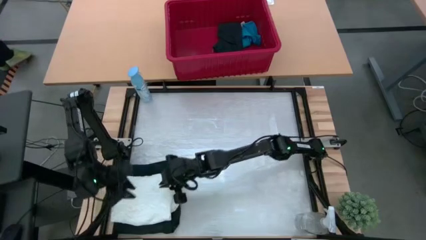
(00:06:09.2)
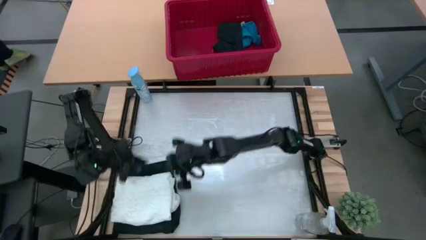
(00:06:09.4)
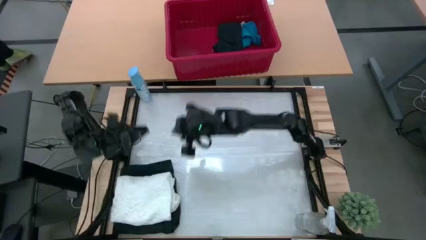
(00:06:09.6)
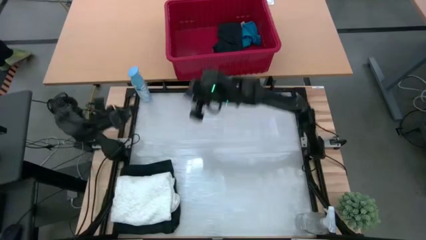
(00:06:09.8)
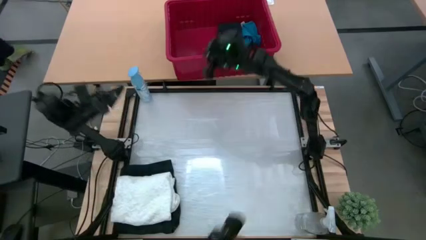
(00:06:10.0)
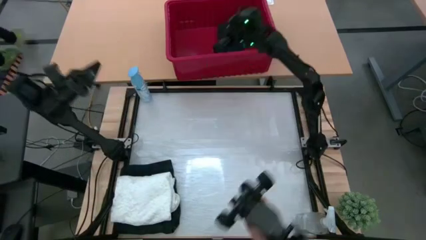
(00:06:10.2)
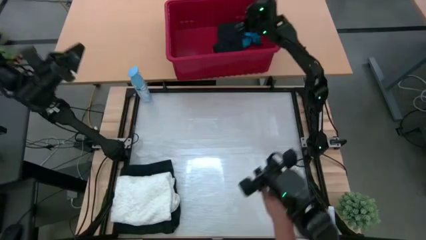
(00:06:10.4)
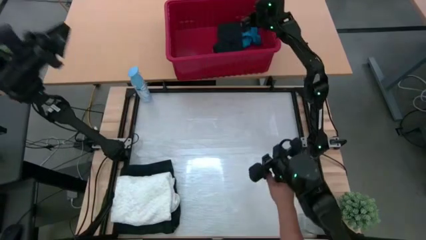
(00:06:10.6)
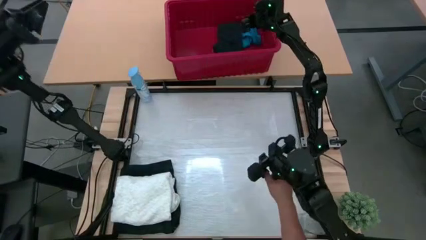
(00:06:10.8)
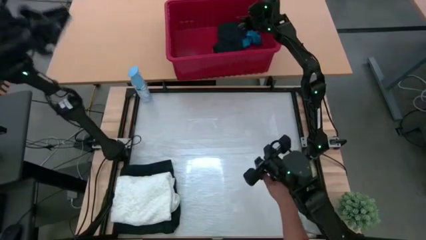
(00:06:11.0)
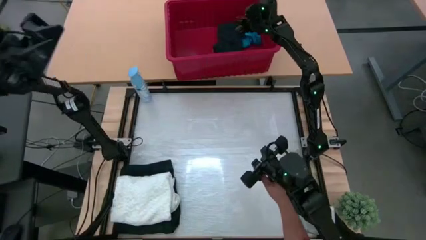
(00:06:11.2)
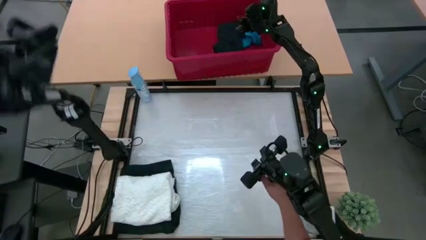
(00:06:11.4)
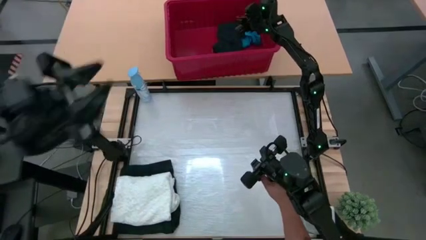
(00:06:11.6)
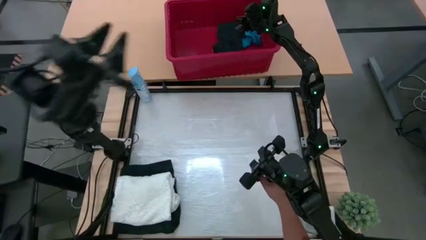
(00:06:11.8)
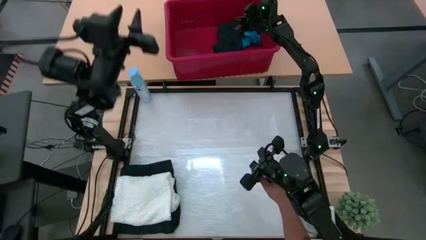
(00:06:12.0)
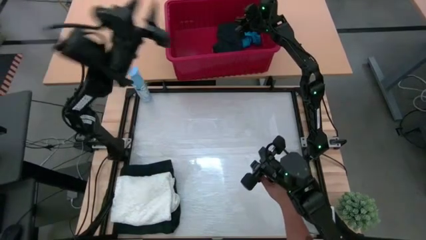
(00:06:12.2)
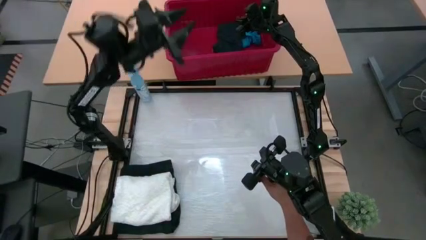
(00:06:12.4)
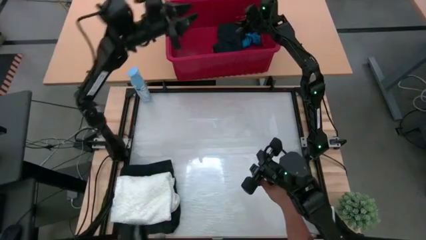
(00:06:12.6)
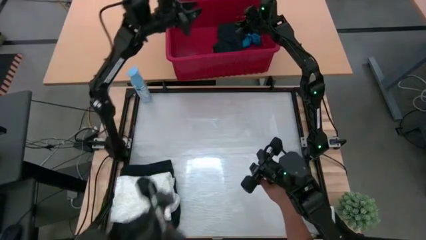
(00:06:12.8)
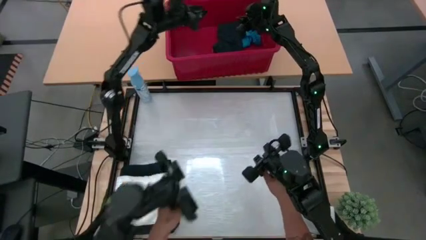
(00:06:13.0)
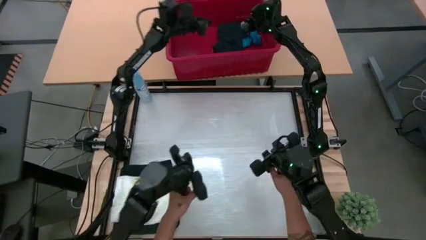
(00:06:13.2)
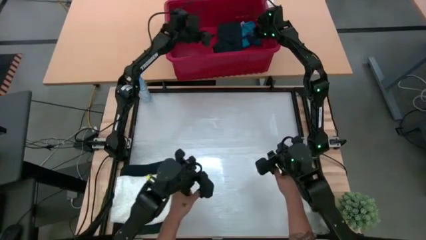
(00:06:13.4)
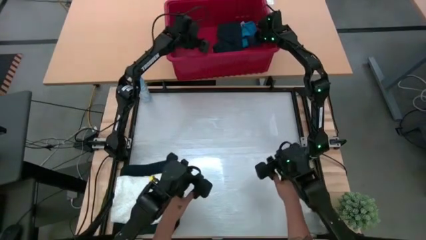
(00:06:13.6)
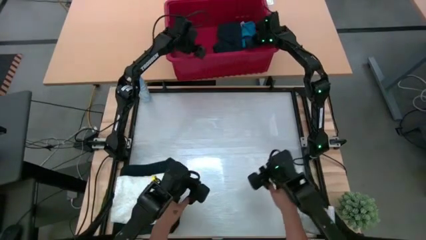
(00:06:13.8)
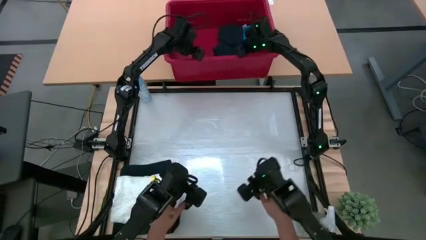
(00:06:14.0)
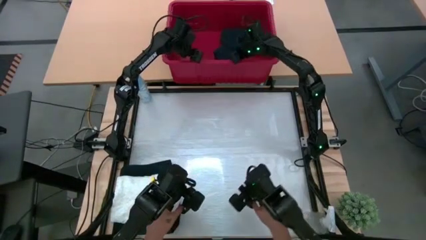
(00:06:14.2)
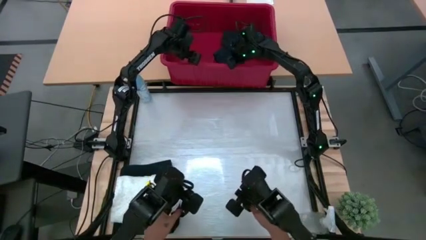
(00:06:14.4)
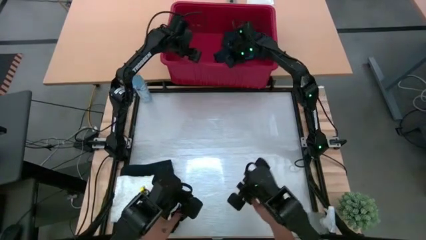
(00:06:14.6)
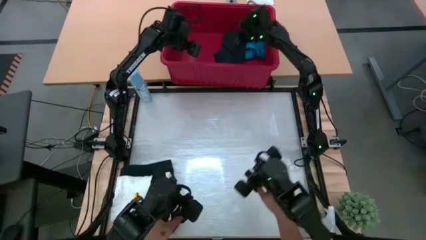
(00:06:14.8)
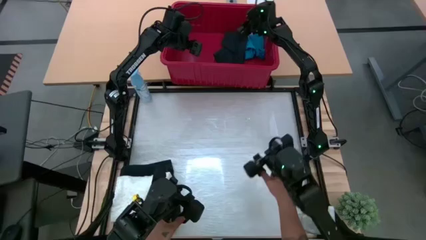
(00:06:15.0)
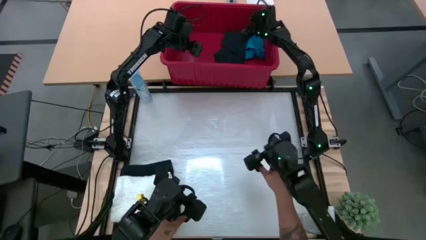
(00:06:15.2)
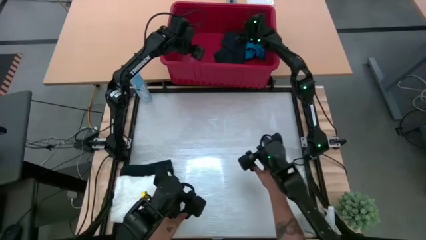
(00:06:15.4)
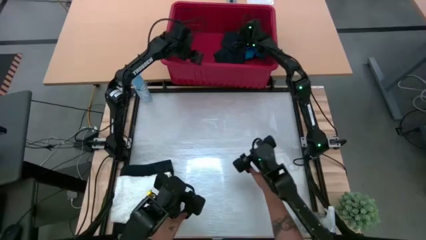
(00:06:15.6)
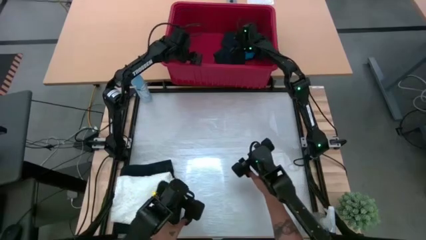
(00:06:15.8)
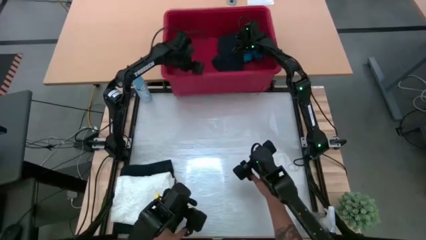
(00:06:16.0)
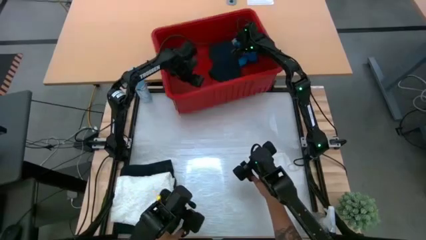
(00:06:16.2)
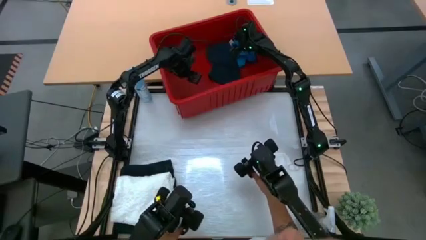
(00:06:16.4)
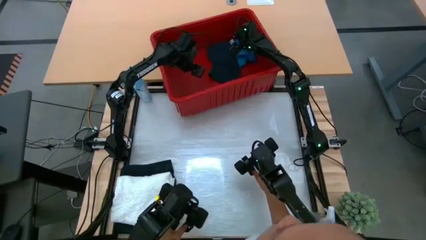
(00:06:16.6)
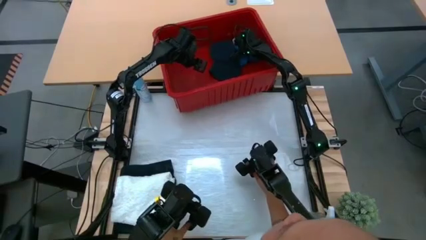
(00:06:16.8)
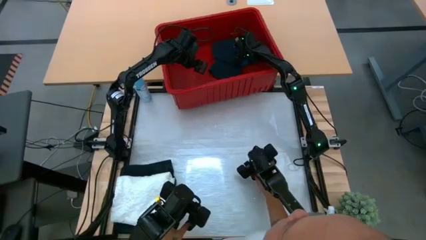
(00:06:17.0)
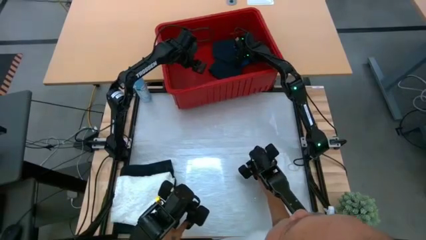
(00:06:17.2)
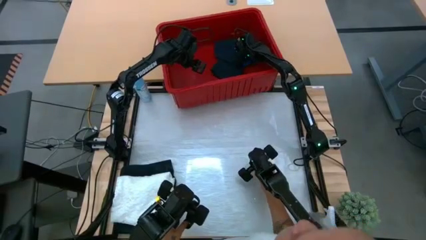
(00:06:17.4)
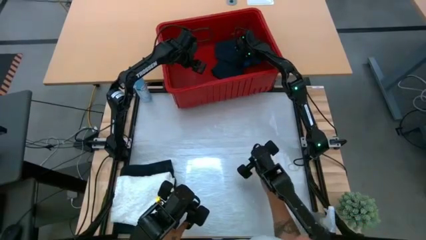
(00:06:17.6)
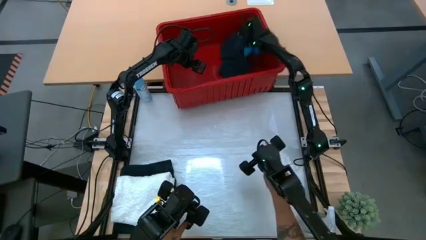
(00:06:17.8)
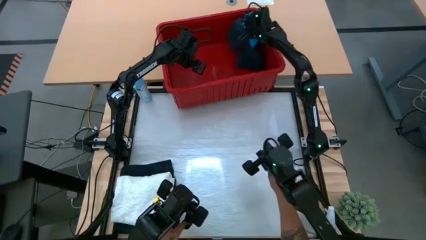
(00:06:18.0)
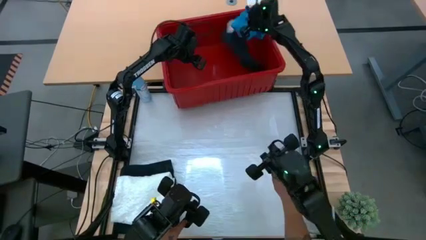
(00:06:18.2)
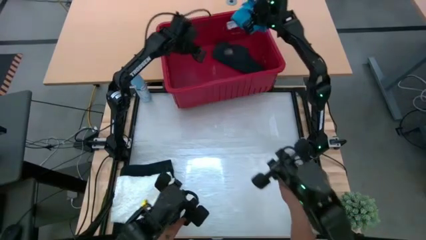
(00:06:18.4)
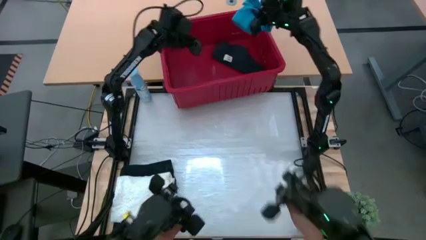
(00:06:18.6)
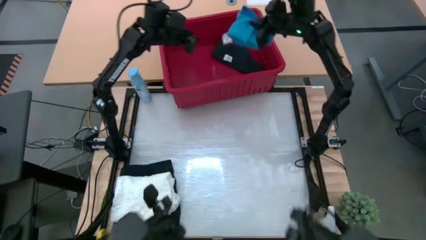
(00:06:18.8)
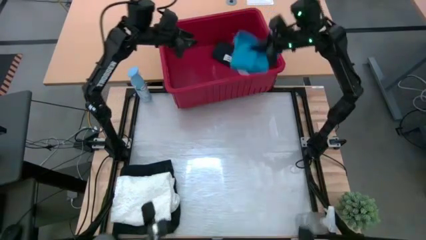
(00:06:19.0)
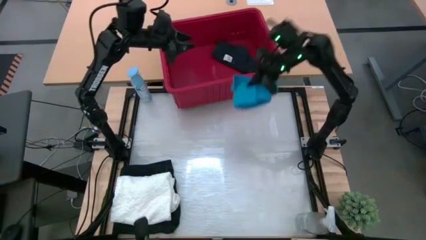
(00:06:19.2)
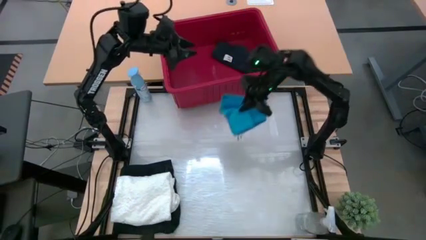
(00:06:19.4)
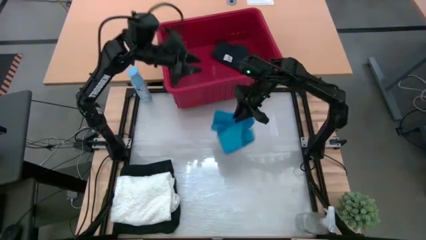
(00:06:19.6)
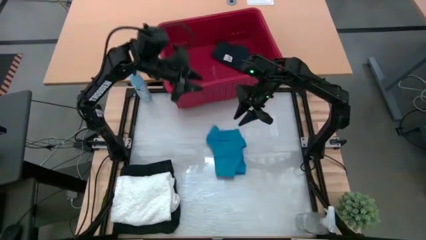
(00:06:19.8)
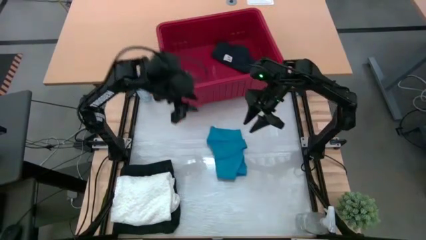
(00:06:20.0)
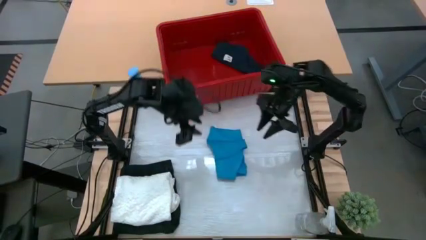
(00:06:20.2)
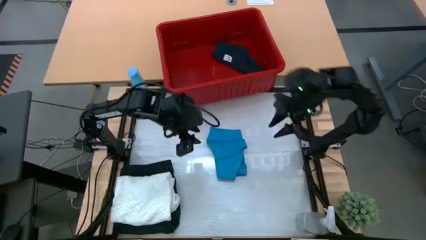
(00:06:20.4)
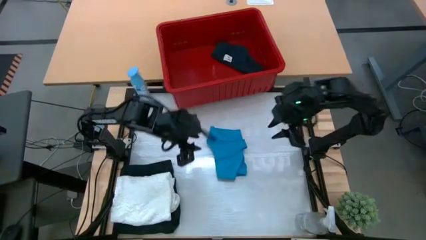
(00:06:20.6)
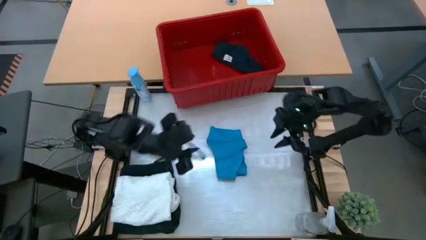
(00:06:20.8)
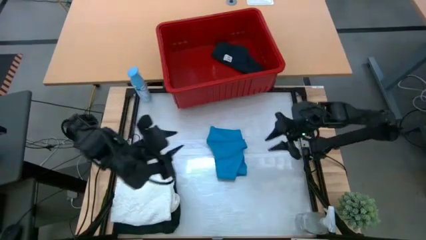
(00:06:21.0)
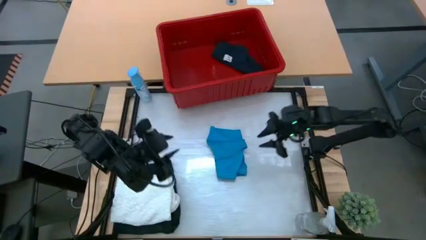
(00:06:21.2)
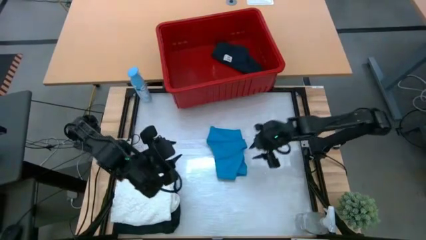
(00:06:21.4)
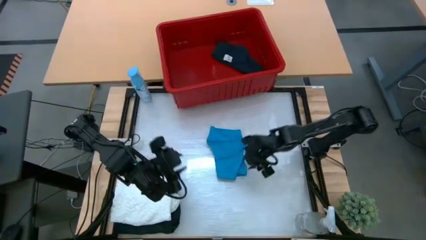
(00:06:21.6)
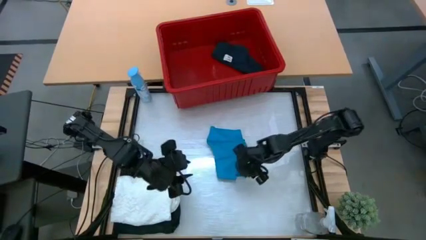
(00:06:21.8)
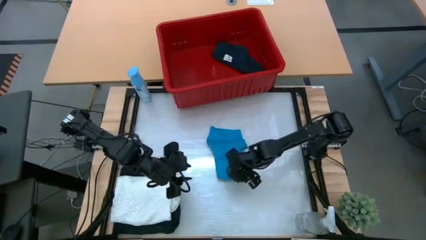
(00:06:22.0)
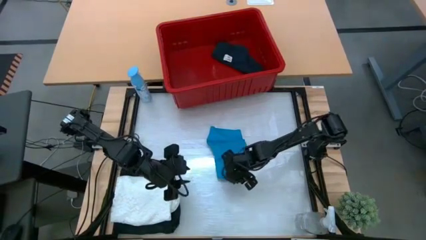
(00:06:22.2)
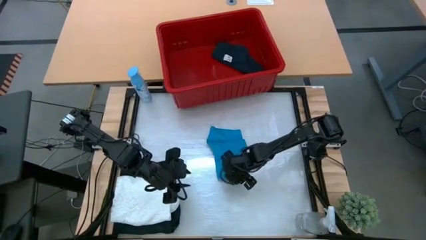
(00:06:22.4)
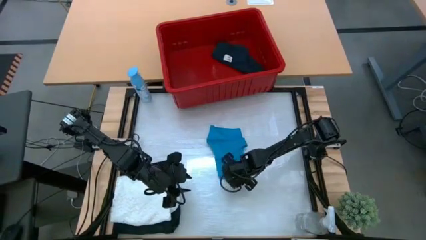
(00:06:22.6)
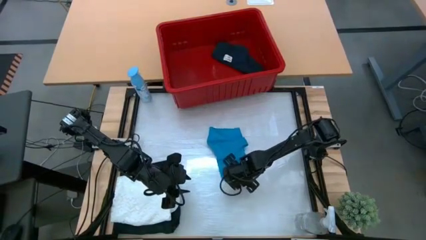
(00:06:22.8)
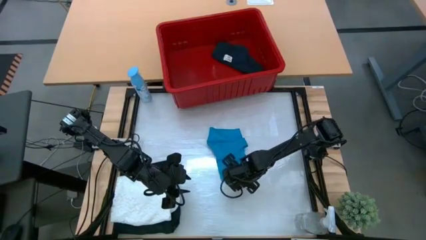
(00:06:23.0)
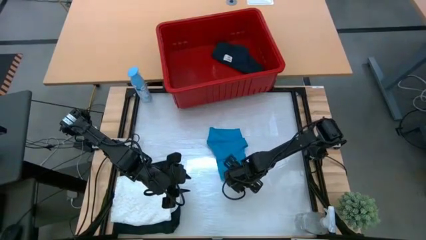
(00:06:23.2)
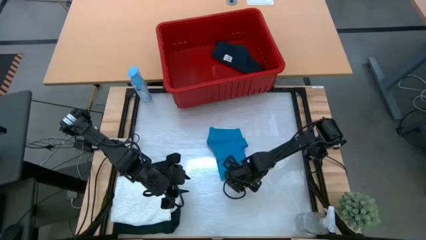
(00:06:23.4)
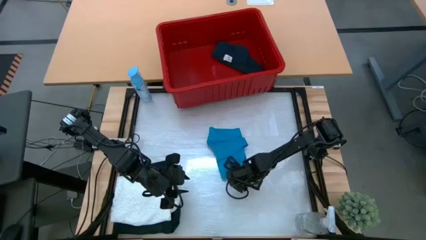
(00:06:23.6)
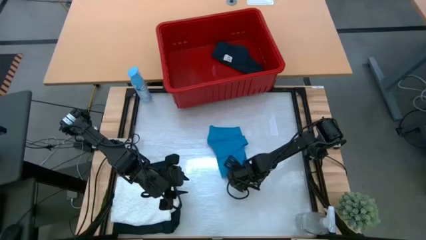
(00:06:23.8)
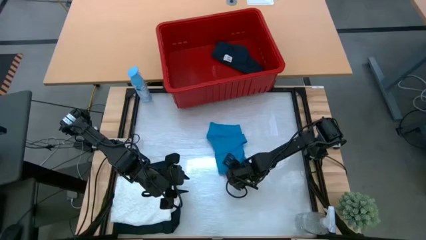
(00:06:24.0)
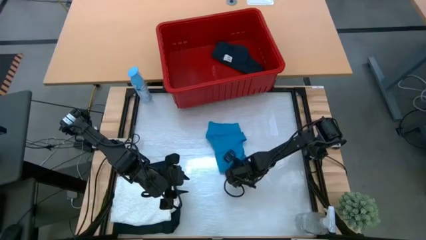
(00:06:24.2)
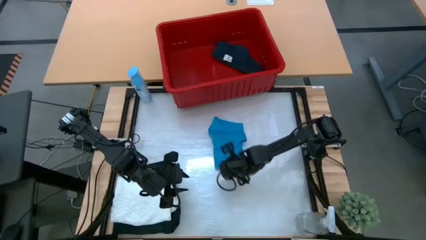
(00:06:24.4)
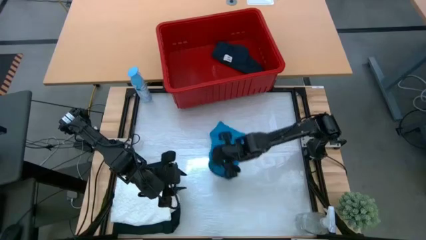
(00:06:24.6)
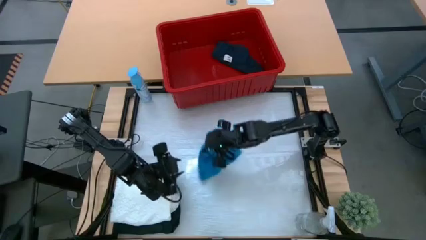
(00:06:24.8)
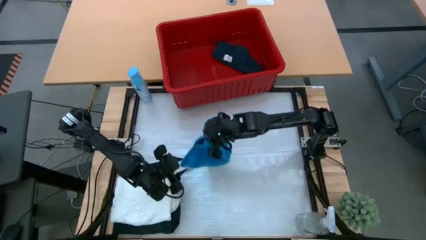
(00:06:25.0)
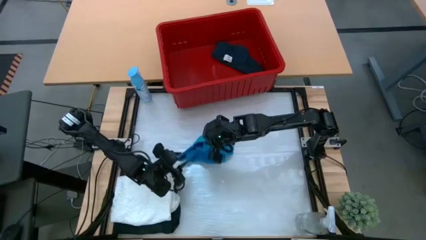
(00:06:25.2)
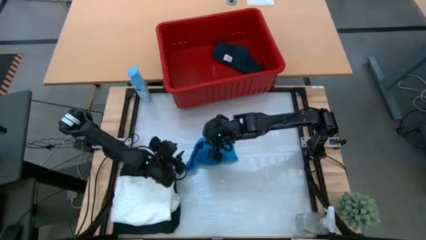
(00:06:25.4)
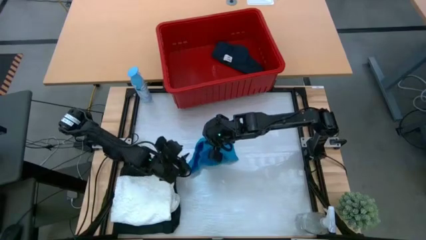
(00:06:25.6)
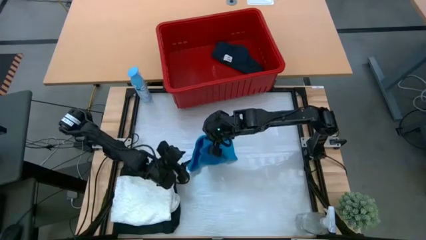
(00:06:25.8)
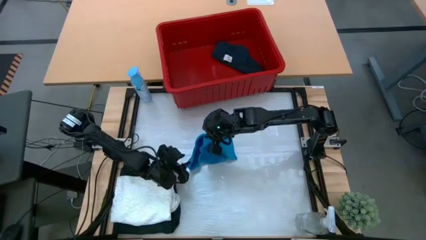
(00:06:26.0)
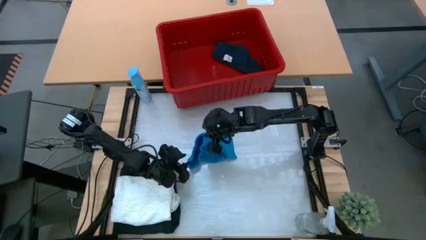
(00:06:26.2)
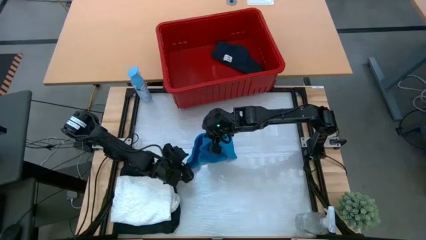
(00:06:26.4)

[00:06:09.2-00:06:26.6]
Task: Fold Laundry from Bin
Fold the blue shorts from the red bin
